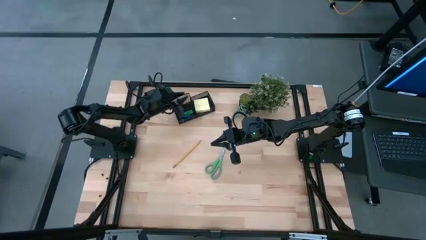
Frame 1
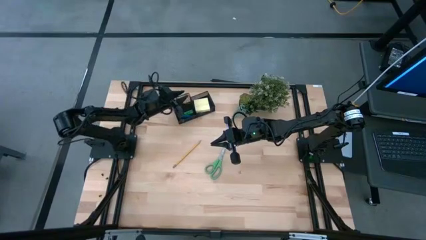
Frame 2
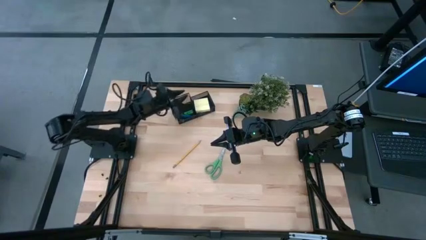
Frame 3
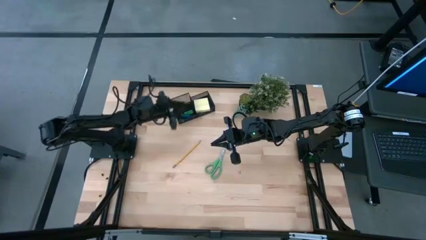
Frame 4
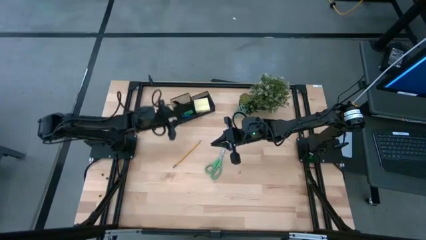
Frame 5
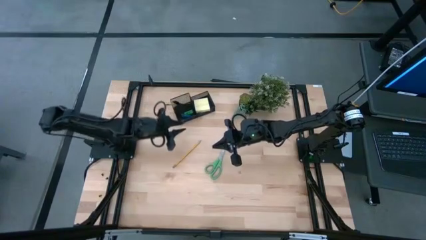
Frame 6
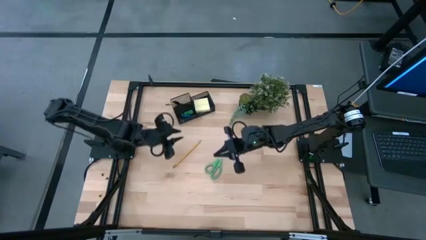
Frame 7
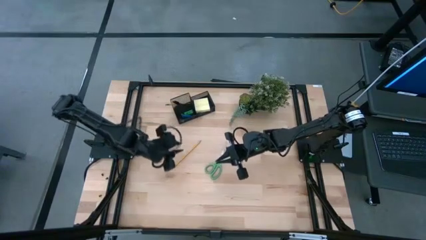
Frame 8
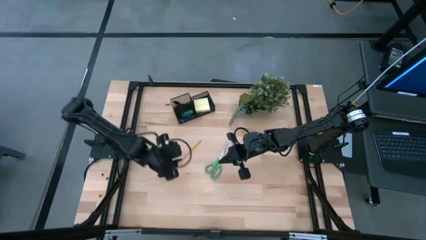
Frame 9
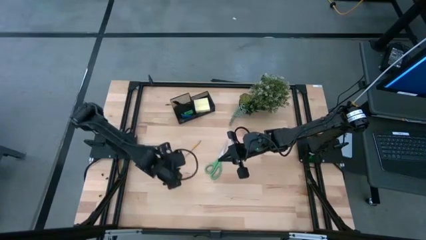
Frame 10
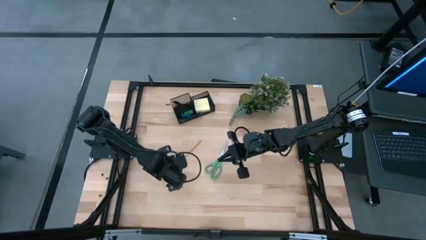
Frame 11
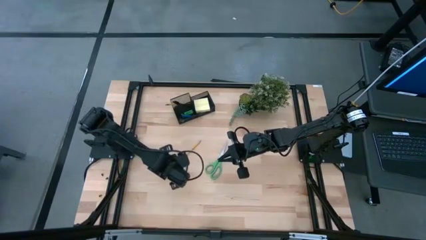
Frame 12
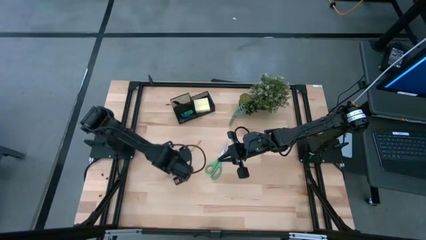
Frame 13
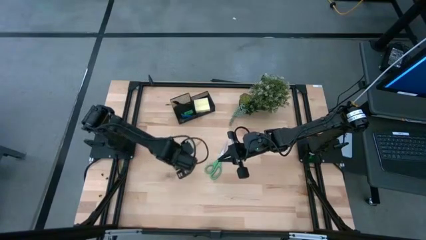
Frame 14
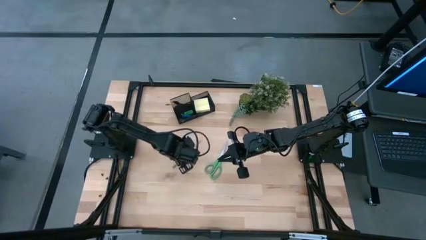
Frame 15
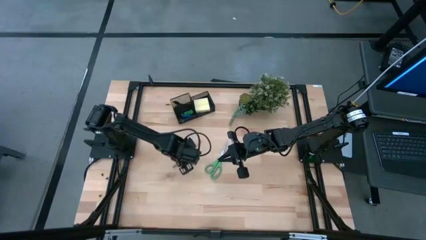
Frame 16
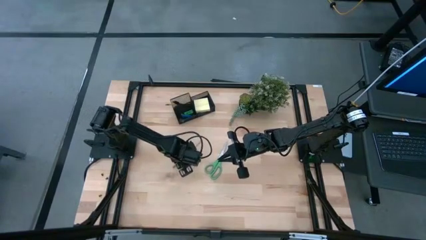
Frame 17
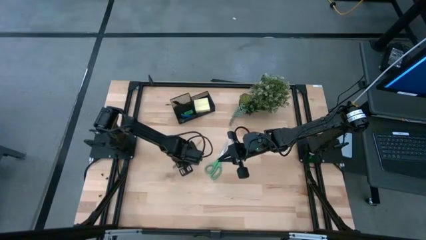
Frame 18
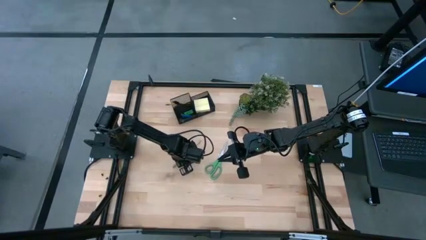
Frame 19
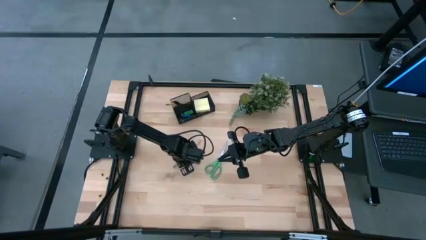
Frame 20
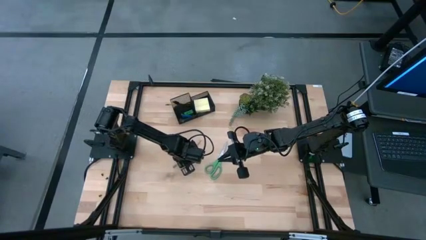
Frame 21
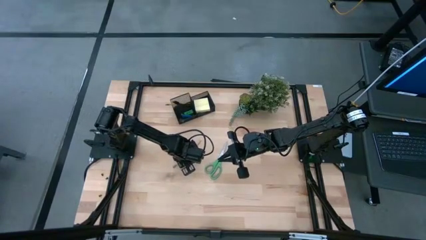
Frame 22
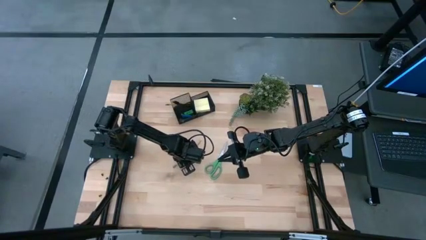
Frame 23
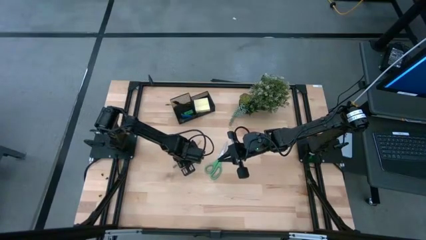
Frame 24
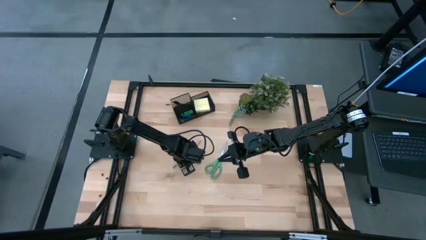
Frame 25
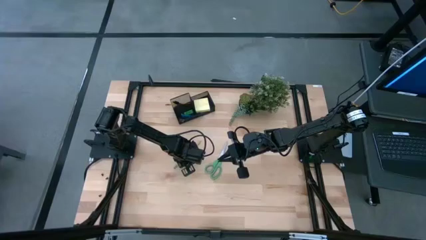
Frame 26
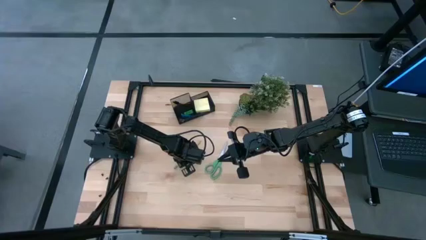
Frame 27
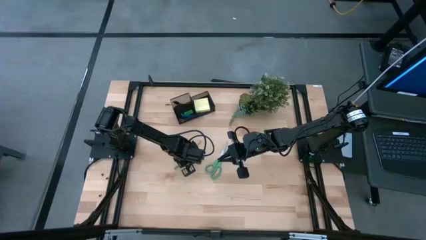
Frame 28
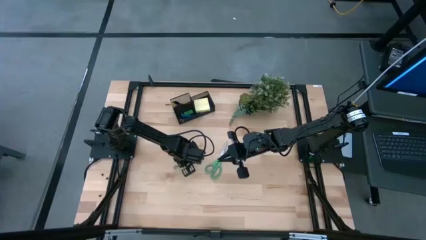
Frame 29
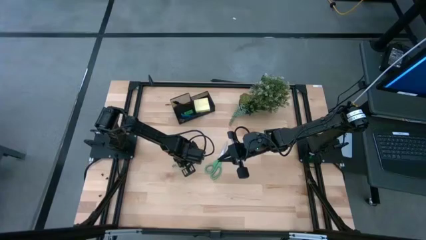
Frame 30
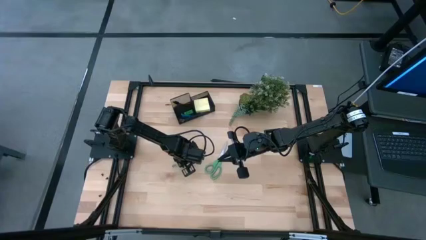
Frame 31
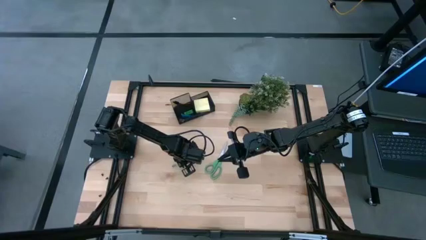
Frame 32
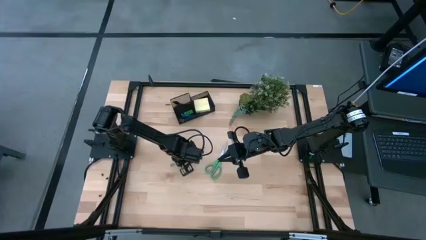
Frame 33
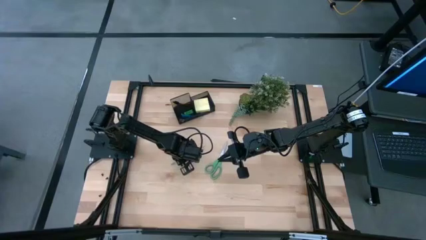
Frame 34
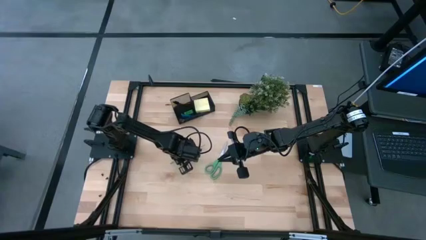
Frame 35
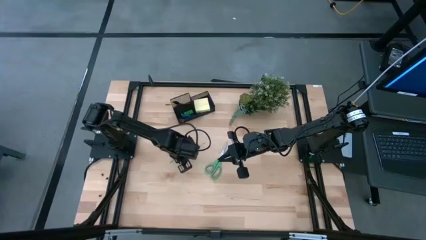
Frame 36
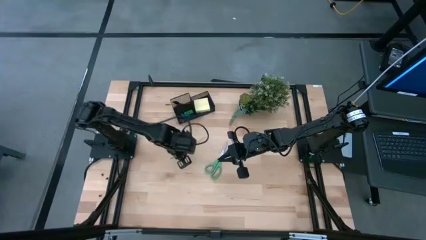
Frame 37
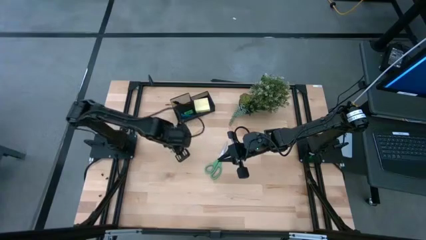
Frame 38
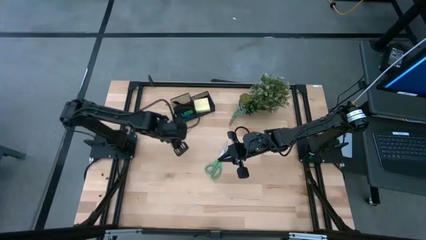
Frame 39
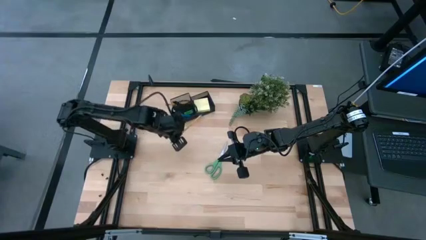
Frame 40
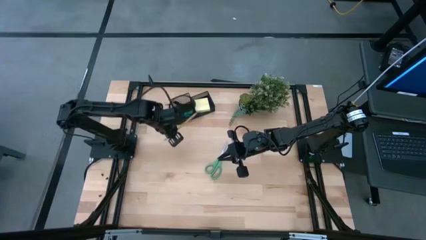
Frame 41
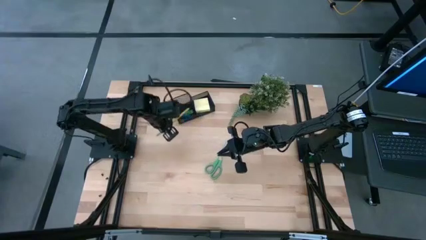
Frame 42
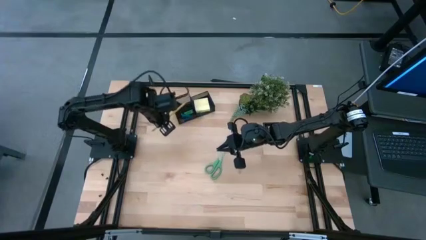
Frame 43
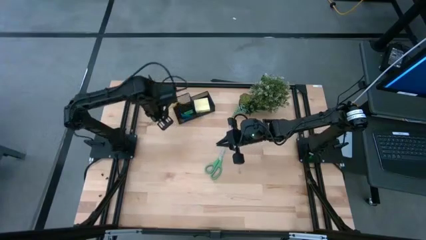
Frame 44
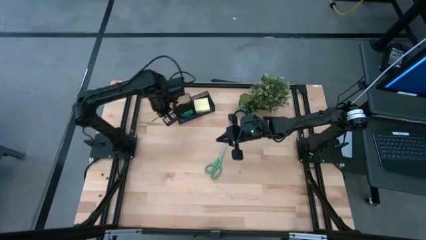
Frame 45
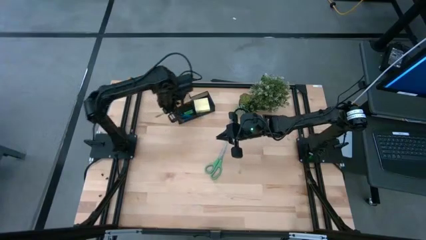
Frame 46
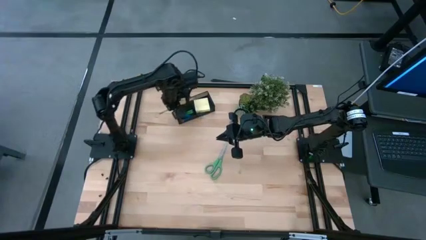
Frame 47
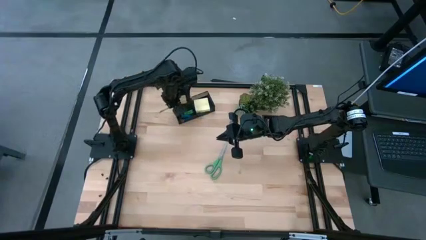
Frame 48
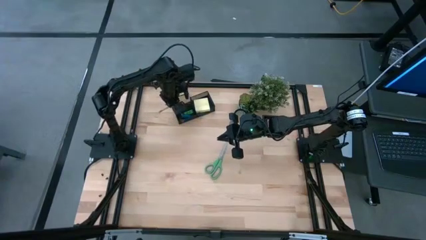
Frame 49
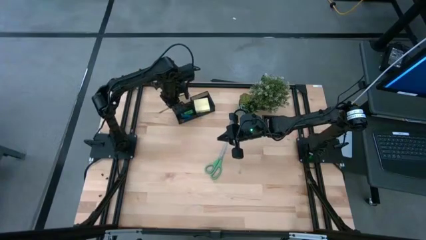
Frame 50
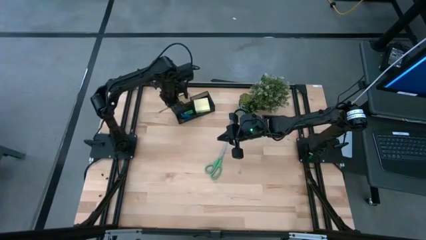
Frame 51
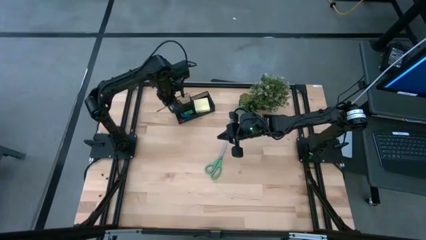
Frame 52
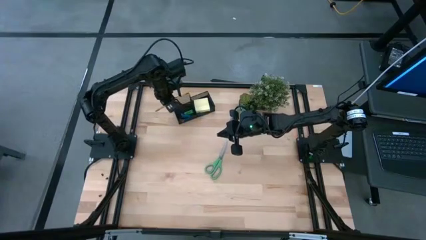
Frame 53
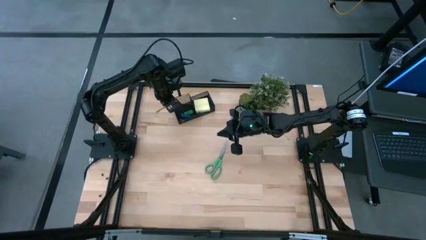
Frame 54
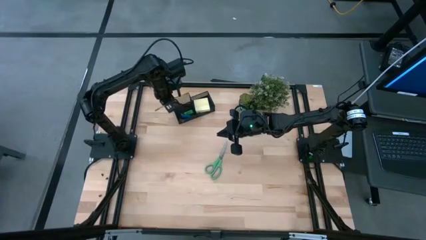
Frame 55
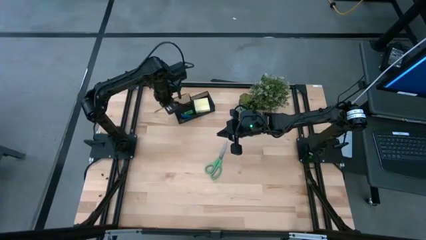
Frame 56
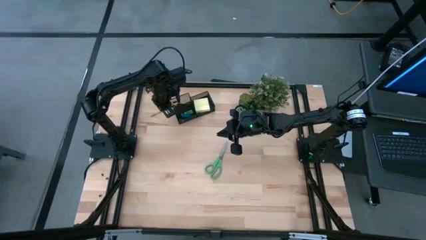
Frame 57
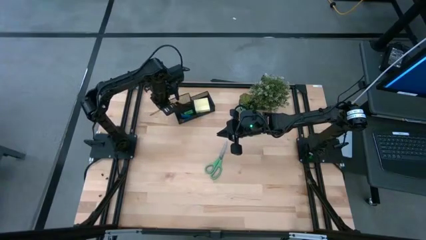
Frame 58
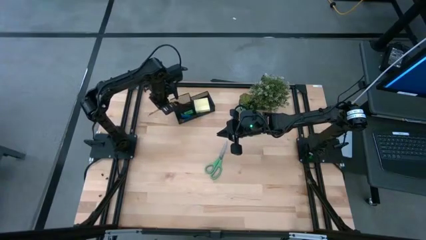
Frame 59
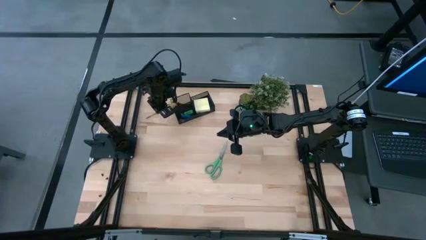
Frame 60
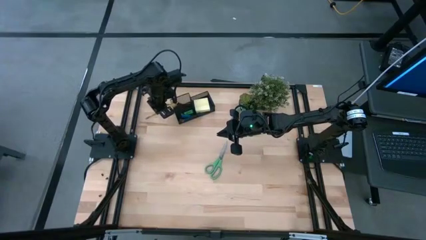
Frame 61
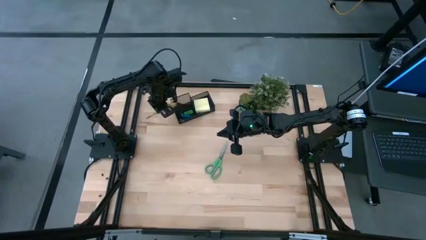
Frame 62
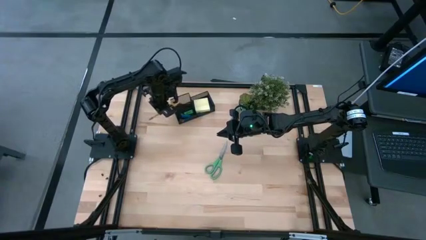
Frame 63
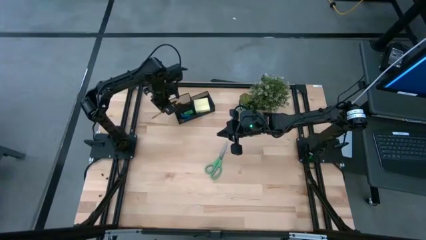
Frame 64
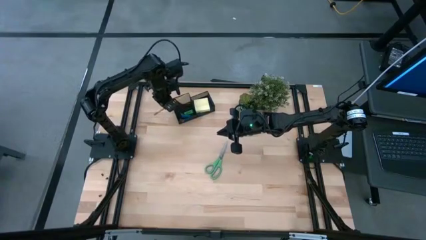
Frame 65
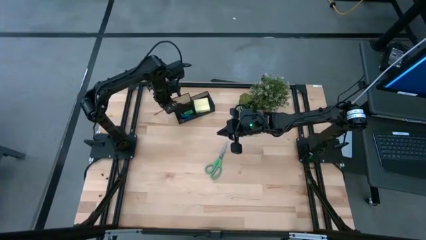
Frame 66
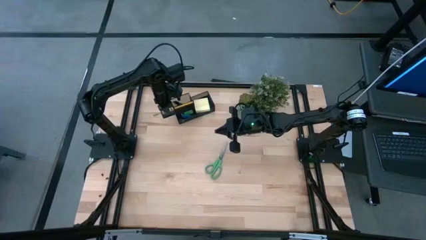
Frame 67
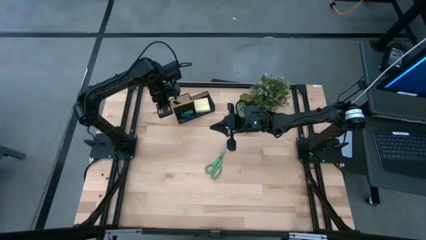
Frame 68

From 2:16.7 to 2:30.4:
Task: Pick and place office supplies into organizer
Put the yellow pencil into the black desk organizer

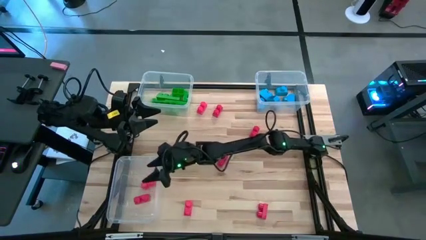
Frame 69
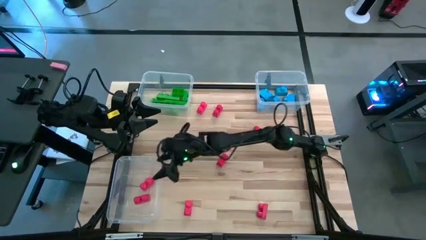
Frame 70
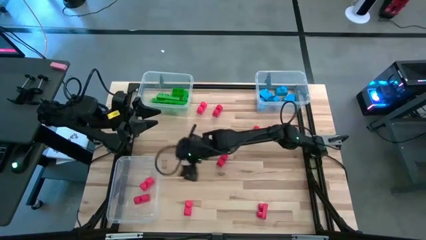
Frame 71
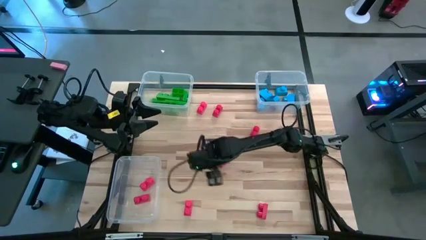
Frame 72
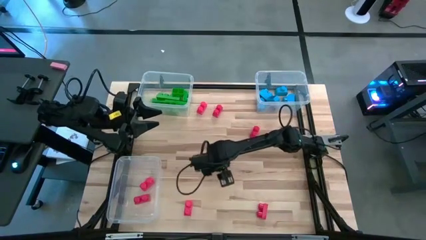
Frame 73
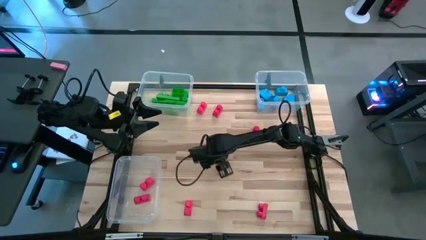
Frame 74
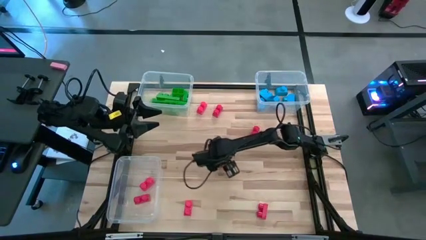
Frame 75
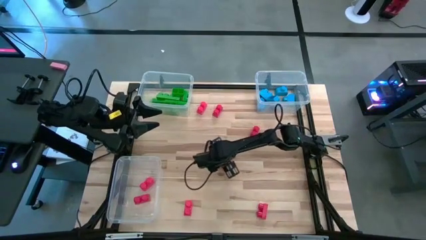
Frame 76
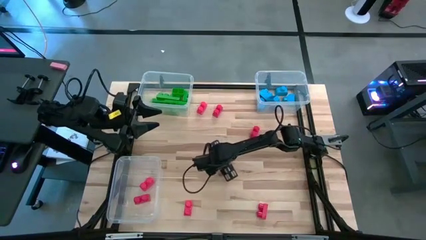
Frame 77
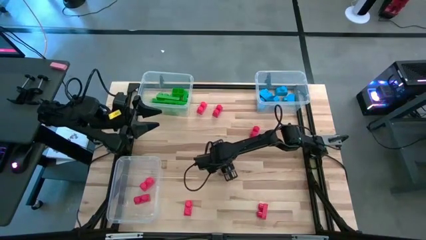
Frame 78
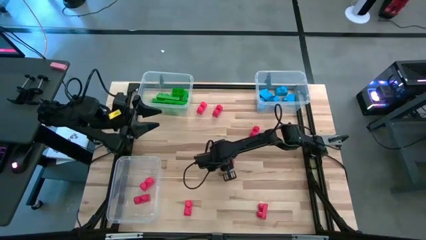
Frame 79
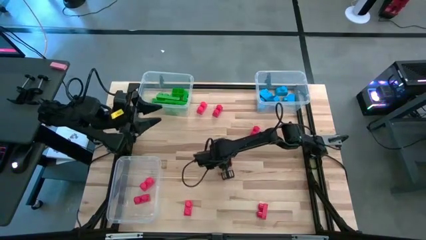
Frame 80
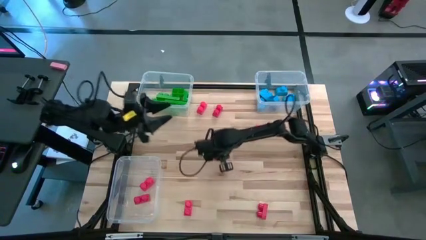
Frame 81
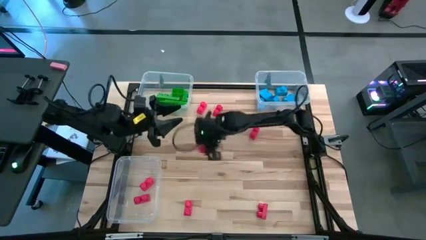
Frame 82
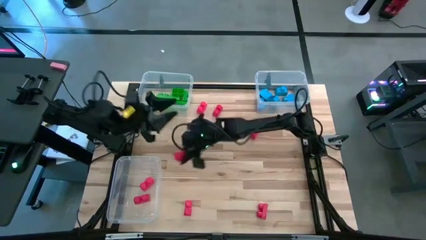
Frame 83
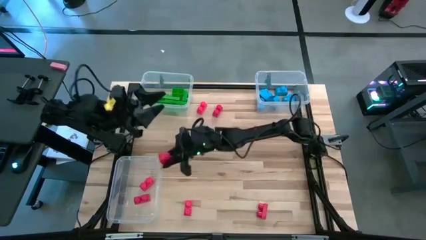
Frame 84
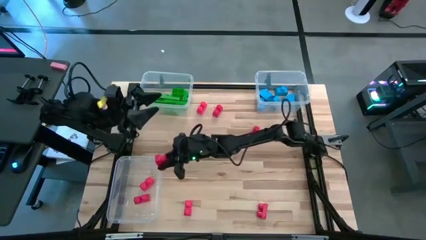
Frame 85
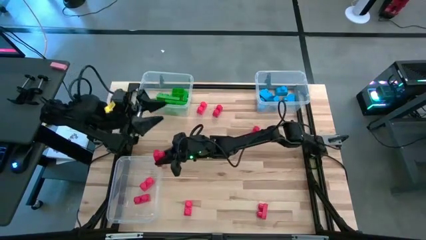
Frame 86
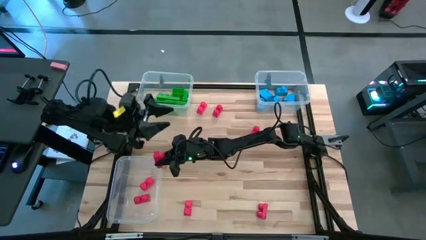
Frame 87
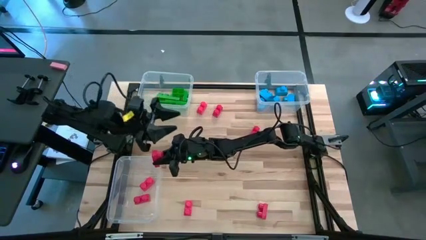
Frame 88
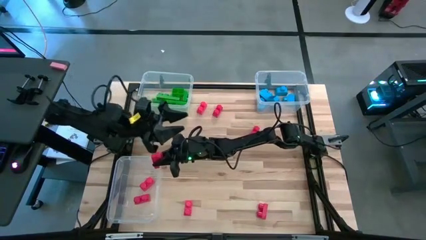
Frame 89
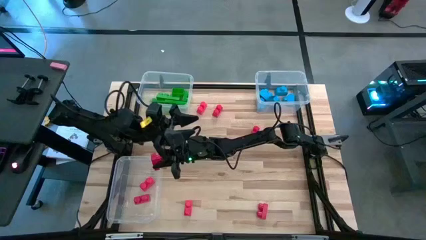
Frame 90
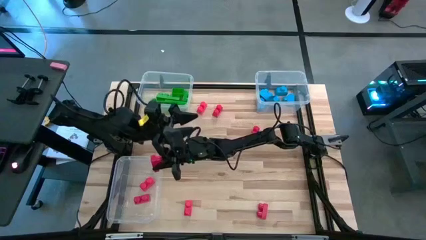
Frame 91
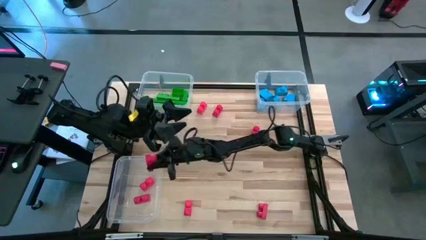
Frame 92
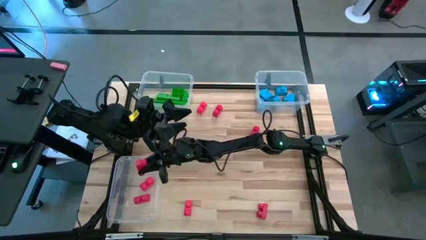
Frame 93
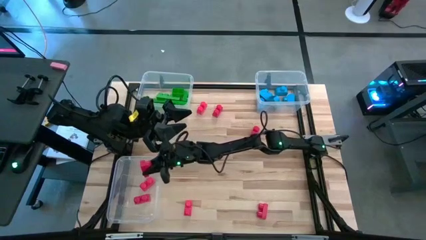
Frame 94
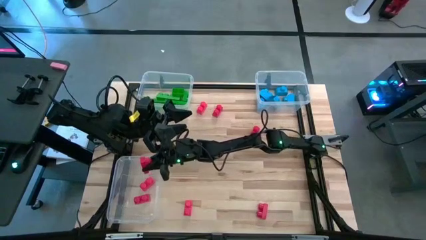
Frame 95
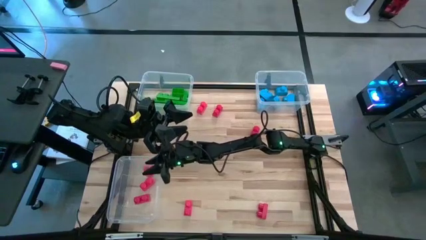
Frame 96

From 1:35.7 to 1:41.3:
Task: Sort blocks
Put the red game piece into the bottom left transparent bin
